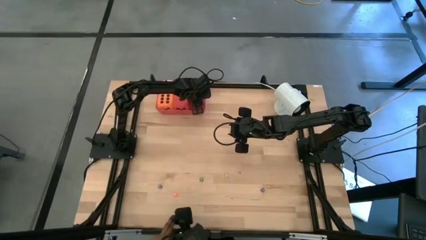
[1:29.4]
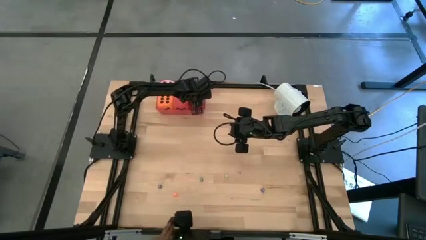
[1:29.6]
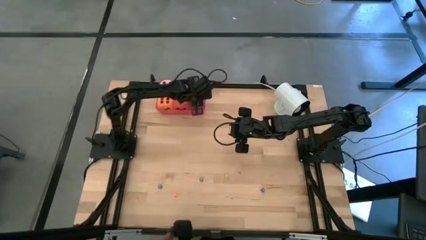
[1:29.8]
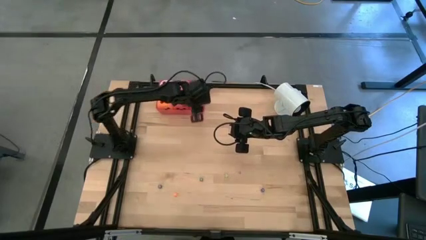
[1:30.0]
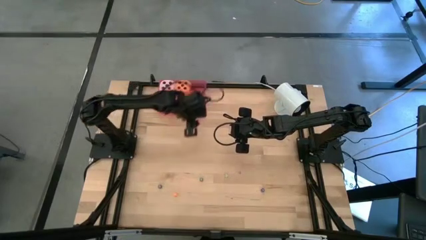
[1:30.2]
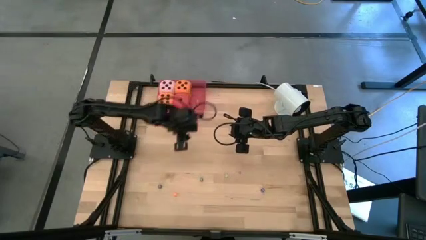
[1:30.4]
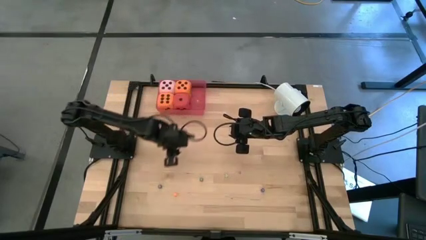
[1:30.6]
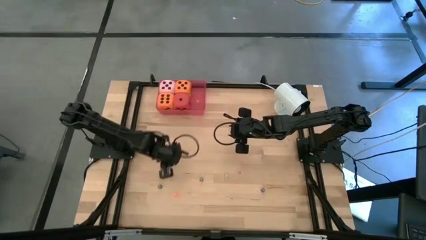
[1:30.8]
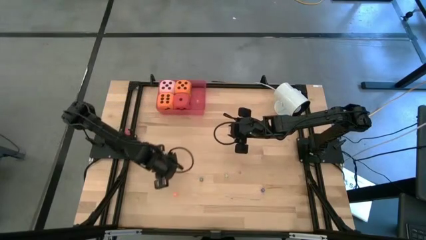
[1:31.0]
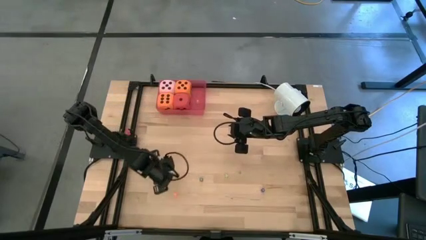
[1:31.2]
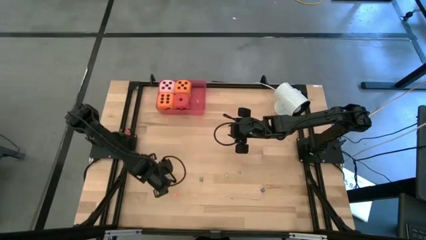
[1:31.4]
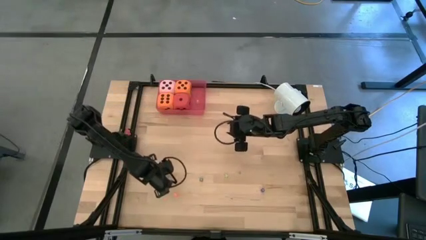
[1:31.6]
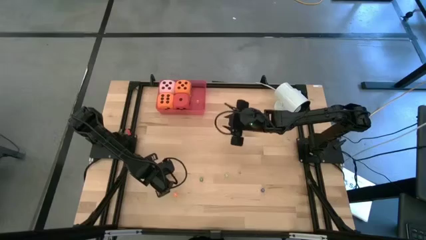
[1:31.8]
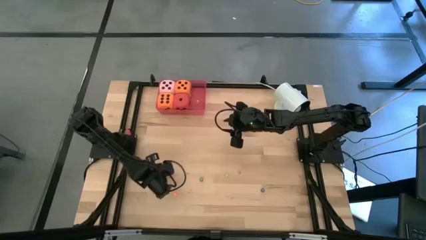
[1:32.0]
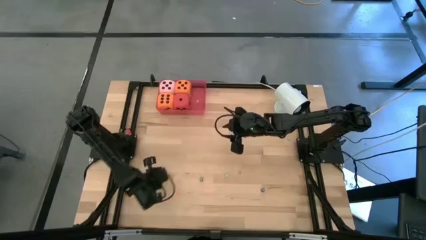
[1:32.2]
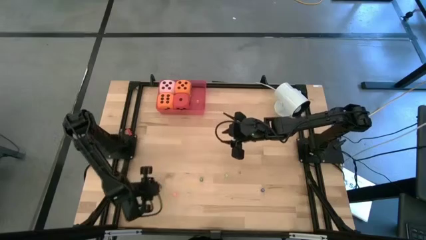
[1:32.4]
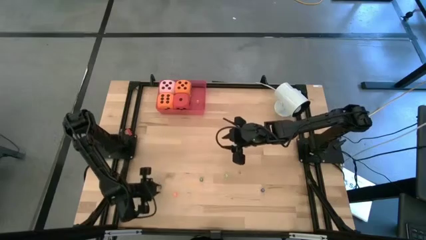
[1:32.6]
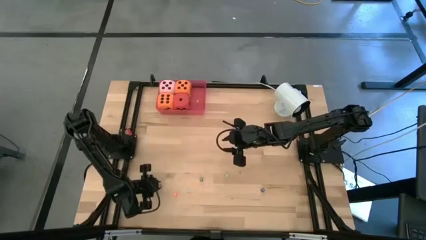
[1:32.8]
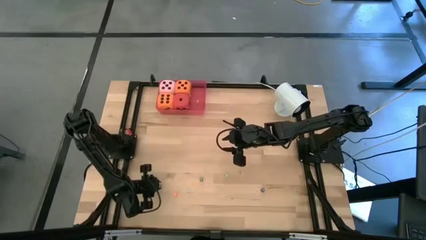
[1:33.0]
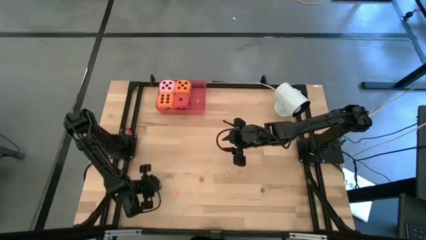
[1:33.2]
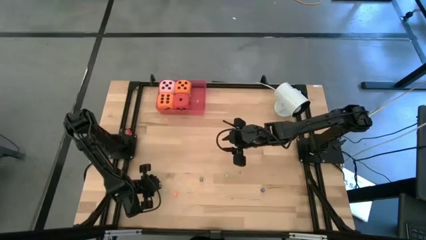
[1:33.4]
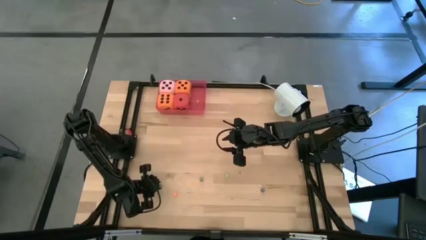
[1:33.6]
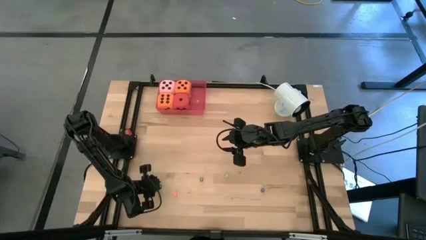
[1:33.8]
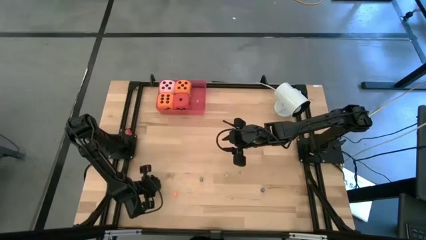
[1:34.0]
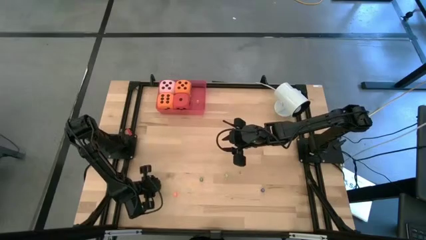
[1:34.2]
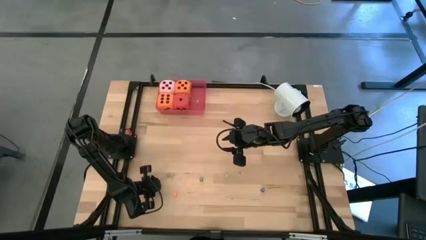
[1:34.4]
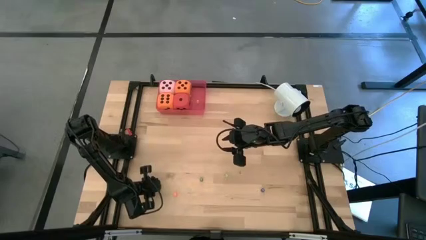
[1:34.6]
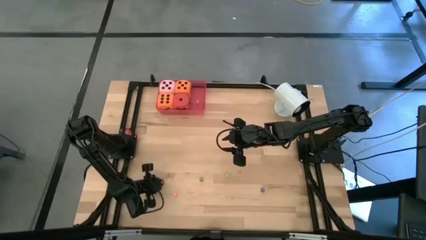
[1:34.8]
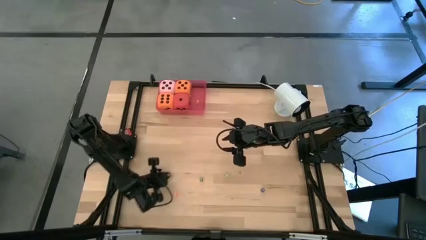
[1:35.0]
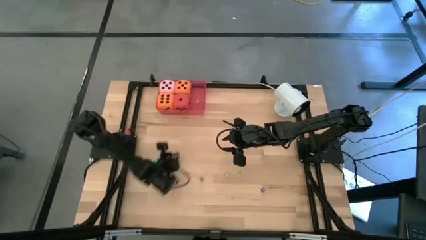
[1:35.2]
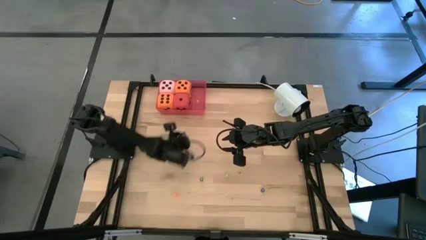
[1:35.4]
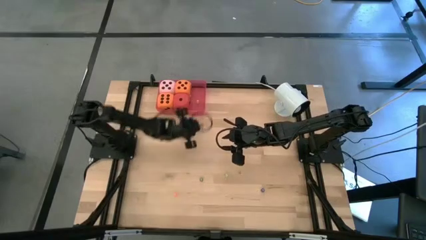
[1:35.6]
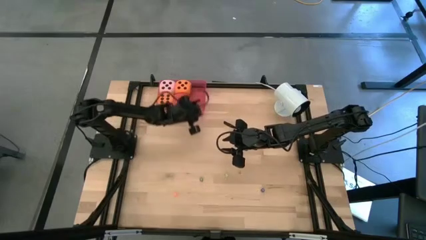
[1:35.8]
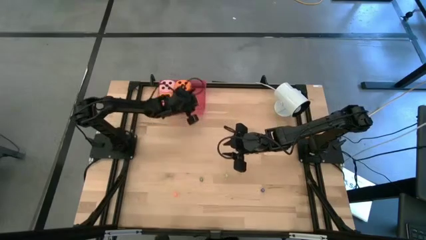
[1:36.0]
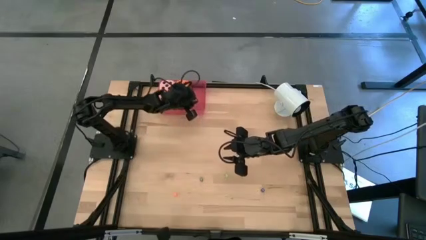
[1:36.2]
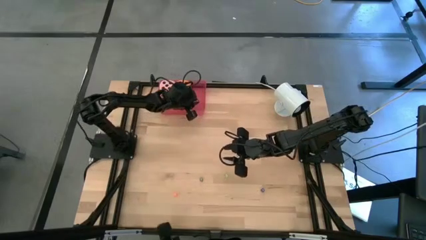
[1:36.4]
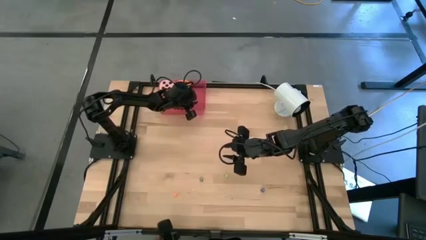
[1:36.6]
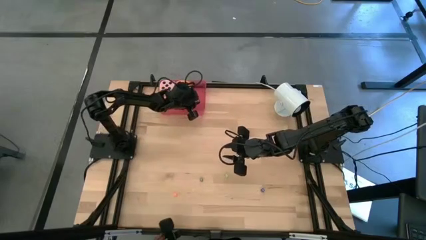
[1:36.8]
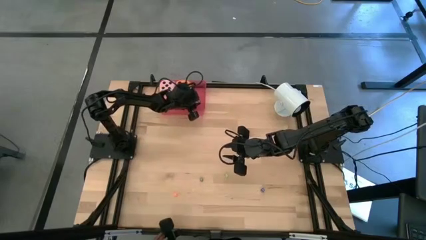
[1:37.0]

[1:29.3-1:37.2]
Task: Pick & Place Dice
Put the left small blue die into the red bin

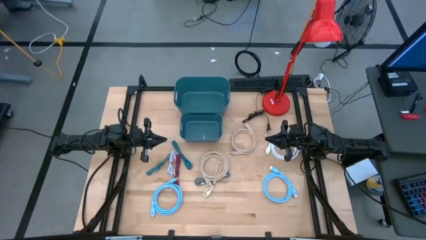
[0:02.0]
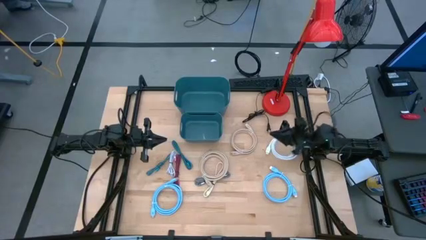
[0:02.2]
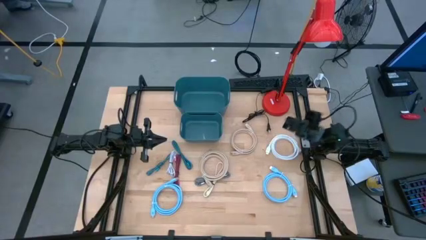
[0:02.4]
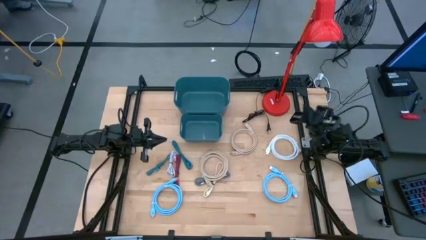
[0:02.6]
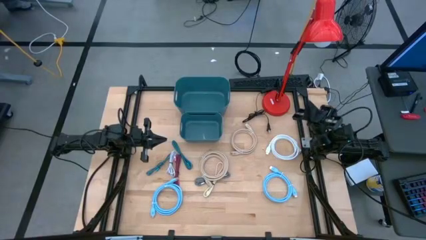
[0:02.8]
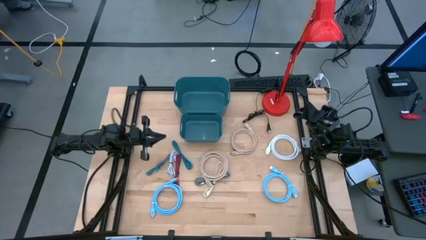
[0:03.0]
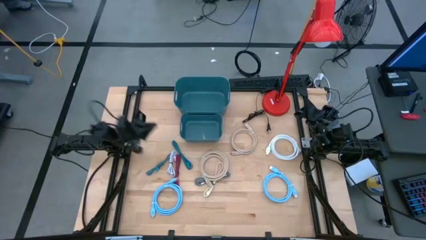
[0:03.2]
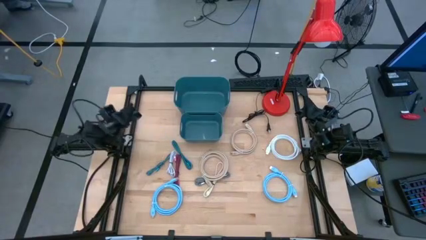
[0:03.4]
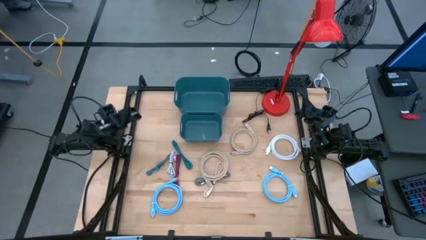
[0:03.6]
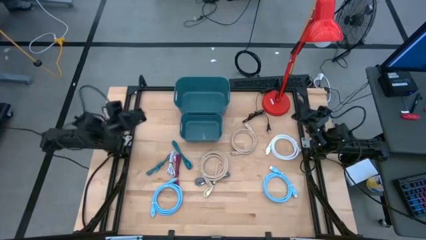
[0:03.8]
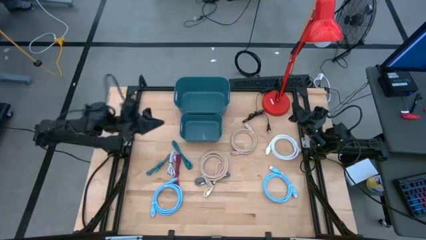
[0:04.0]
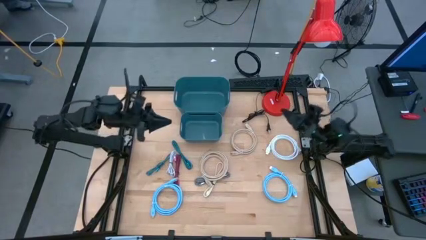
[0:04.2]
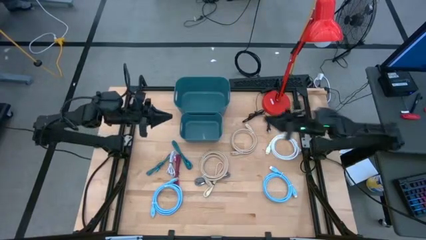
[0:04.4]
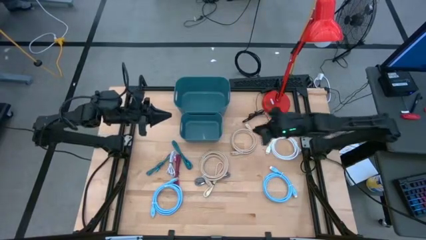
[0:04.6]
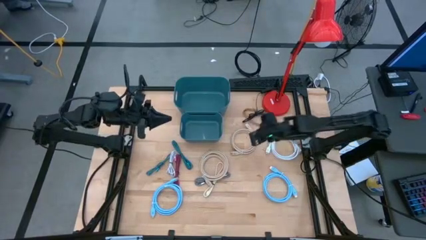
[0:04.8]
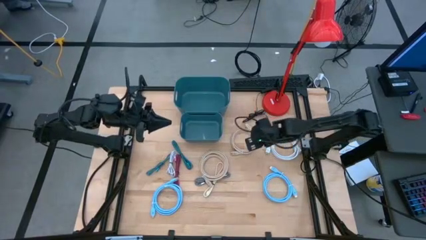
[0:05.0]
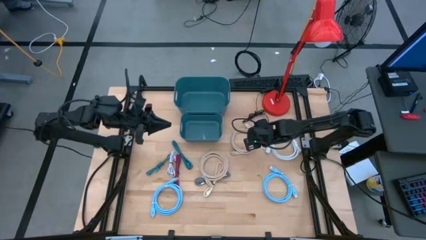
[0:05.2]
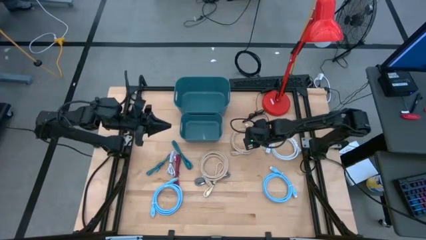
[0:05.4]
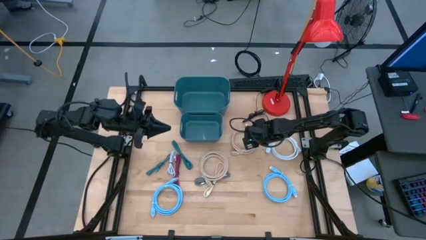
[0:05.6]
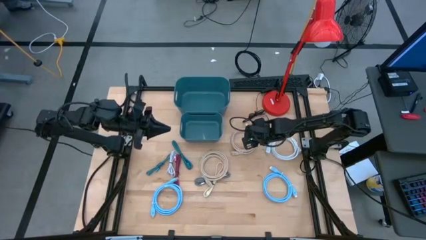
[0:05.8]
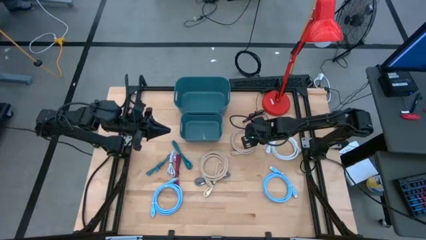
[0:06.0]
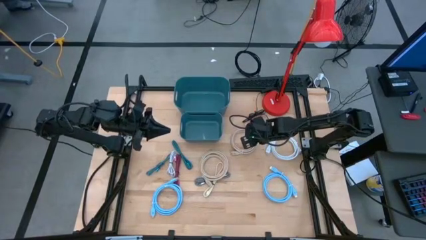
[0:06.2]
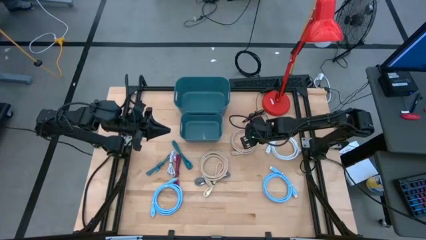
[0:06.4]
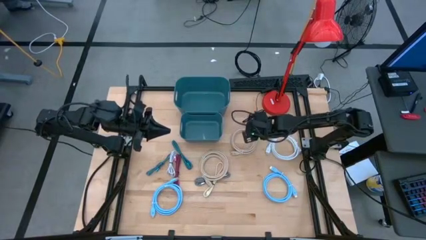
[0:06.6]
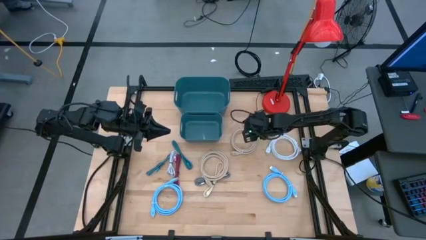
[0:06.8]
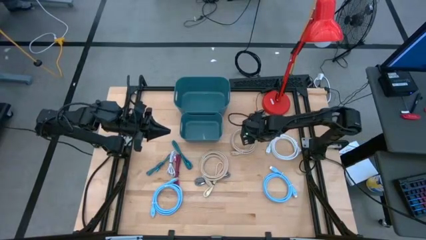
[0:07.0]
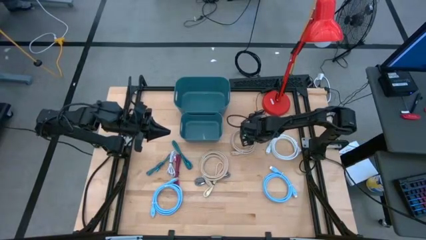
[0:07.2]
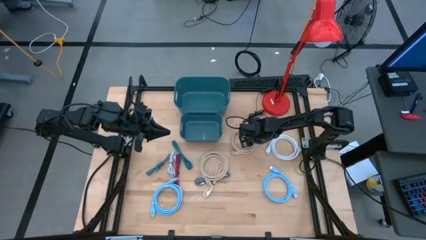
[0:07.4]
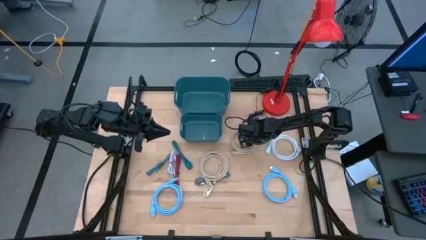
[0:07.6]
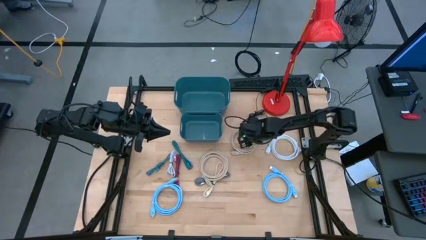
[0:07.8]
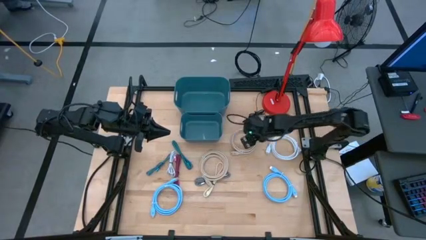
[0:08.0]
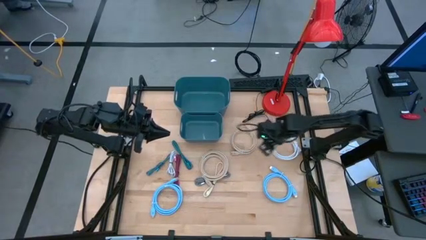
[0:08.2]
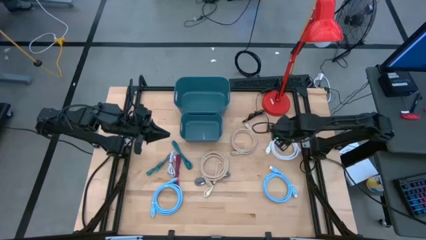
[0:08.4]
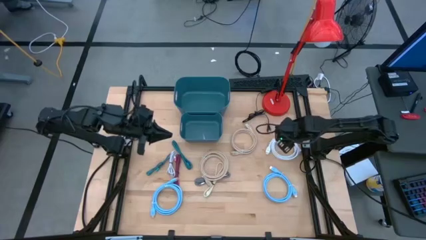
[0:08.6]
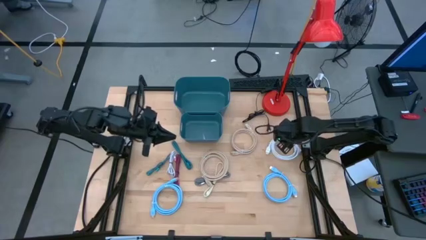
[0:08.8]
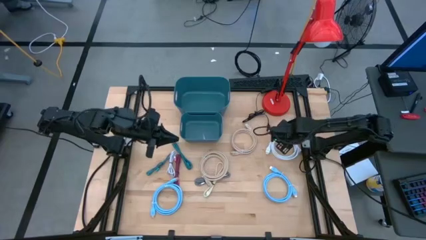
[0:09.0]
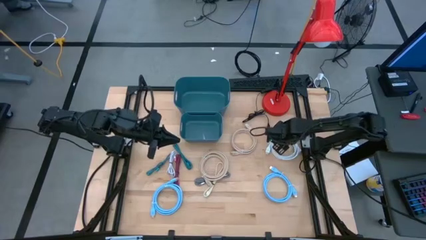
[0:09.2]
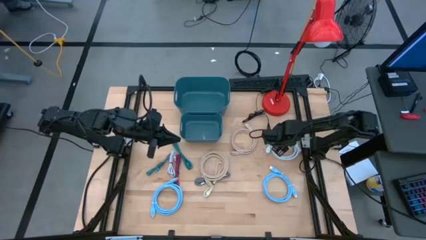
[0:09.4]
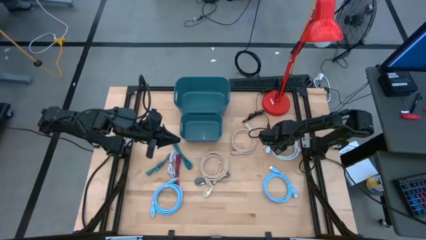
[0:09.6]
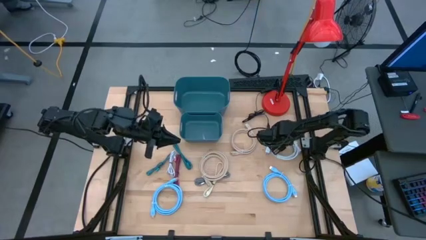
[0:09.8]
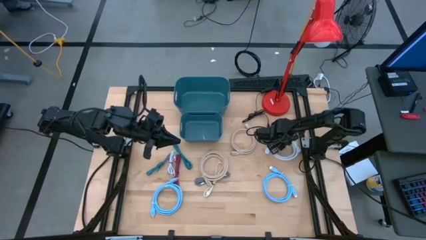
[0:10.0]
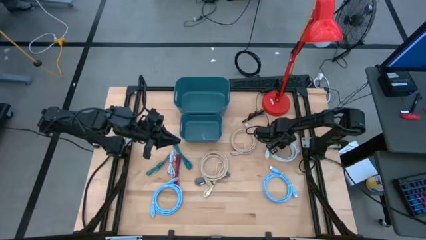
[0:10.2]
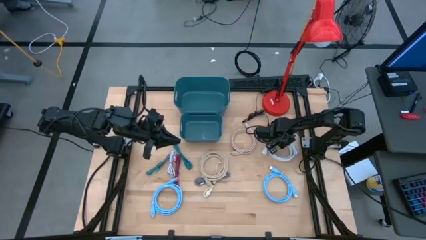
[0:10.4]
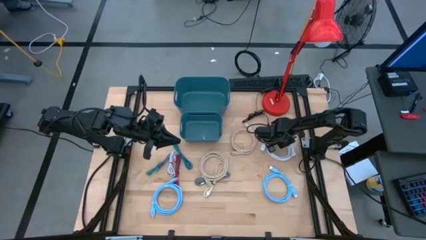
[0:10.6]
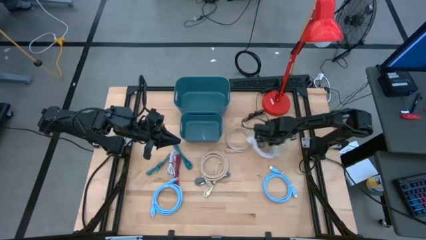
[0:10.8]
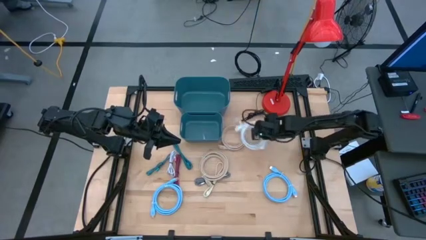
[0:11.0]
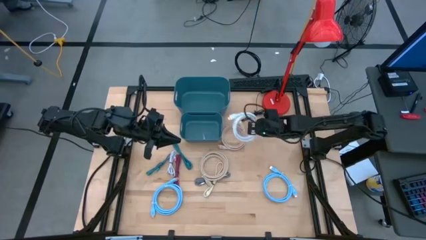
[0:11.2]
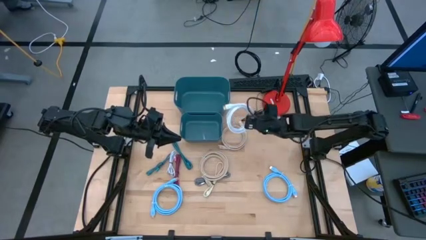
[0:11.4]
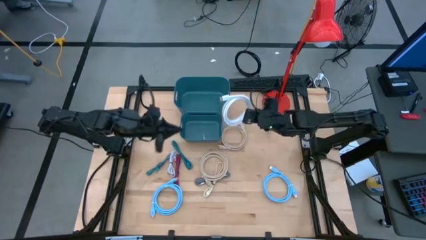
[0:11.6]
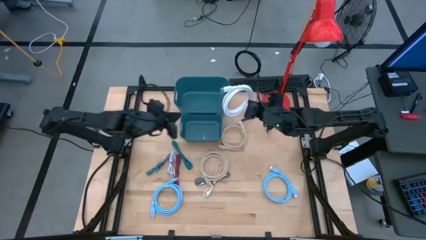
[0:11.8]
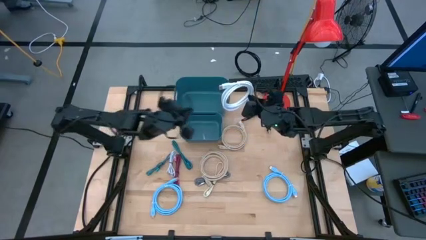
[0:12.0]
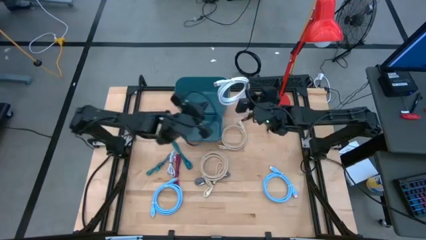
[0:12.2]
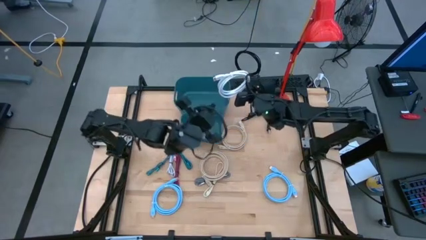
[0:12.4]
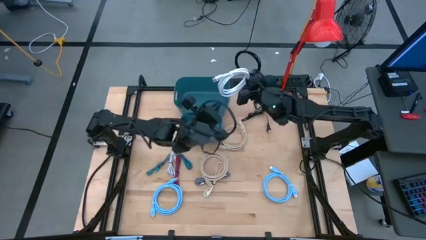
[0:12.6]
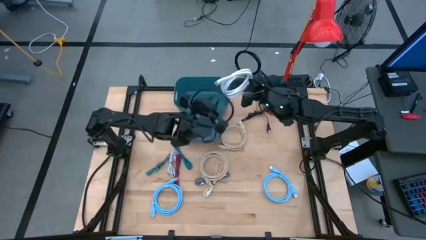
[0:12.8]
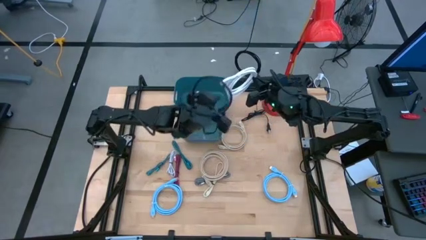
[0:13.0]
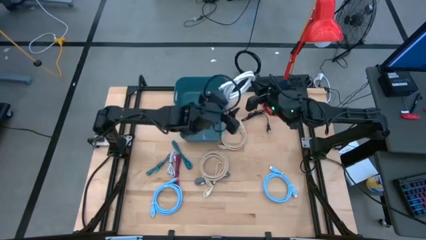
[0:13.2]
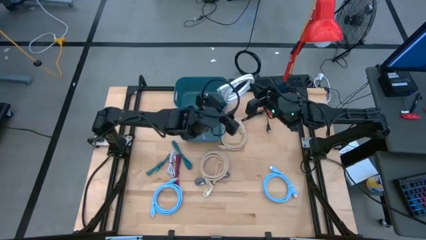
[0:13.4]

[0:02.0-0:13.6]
Task: Pick & Place USB Port
Put the white HDMI cable into the top blue bin
